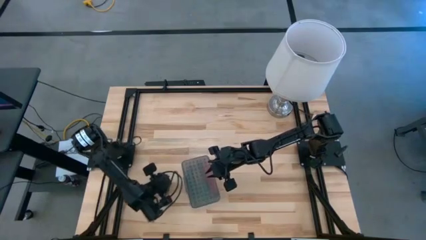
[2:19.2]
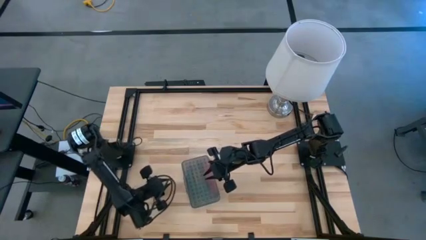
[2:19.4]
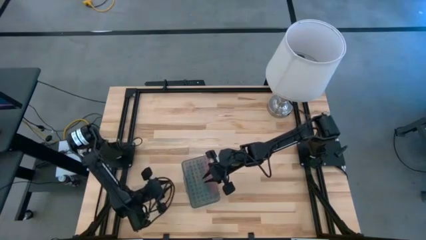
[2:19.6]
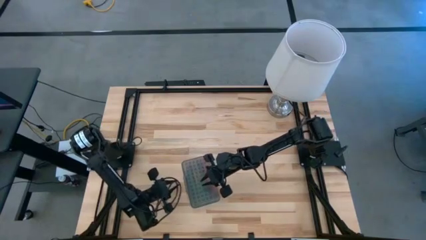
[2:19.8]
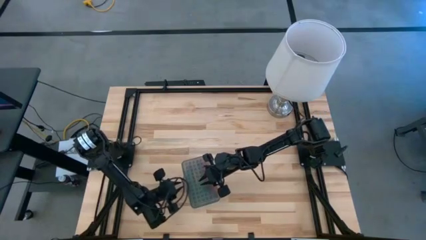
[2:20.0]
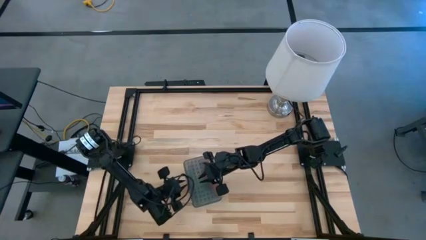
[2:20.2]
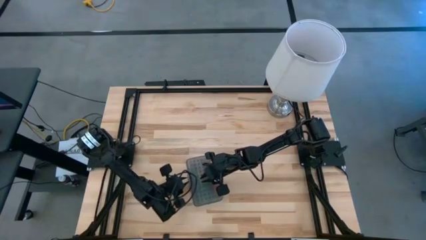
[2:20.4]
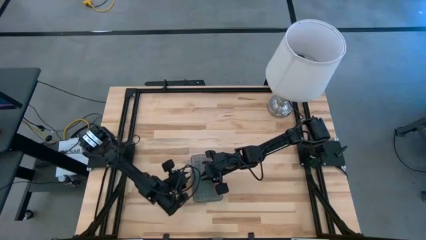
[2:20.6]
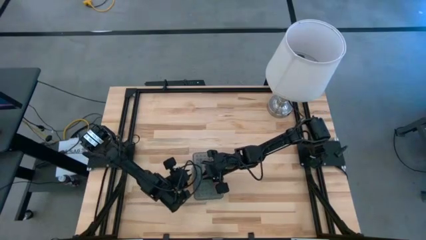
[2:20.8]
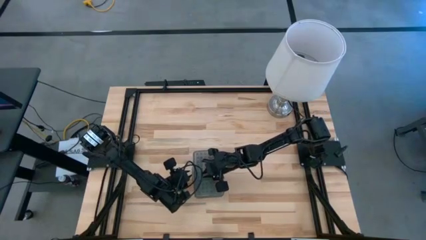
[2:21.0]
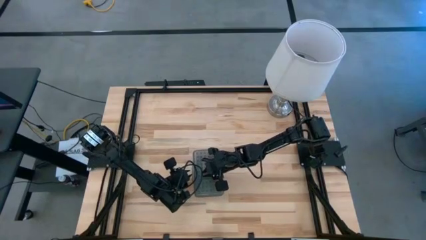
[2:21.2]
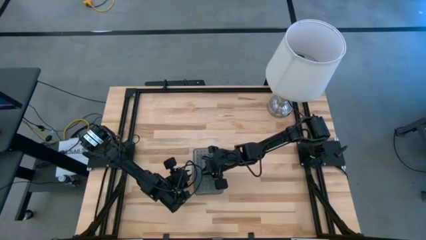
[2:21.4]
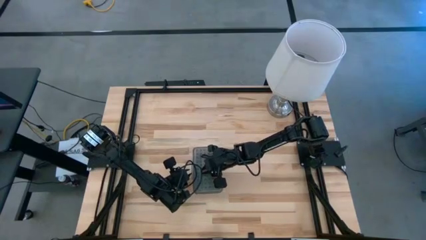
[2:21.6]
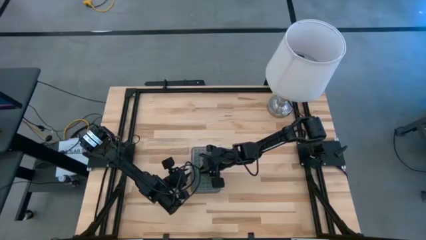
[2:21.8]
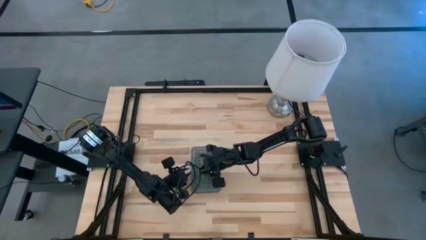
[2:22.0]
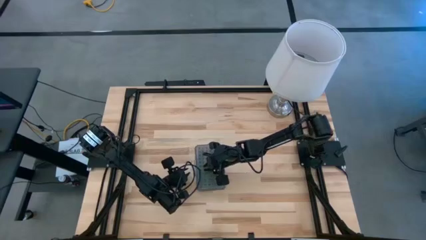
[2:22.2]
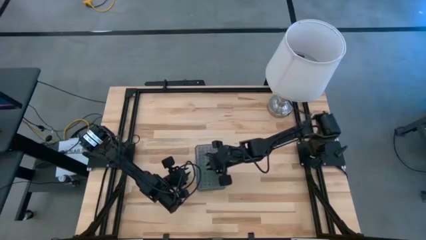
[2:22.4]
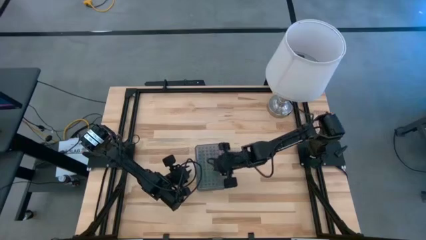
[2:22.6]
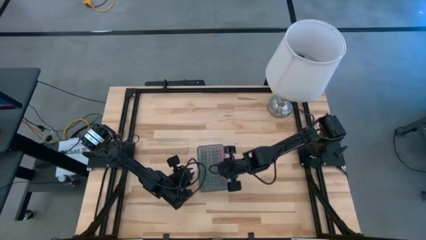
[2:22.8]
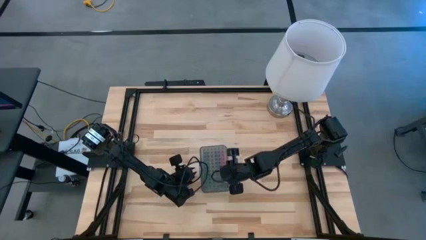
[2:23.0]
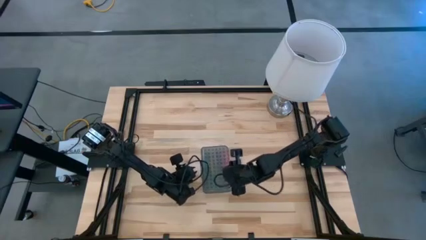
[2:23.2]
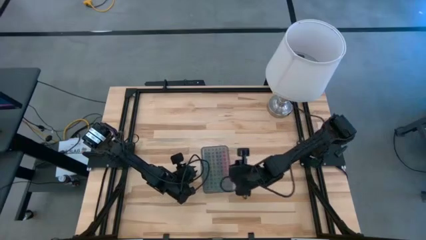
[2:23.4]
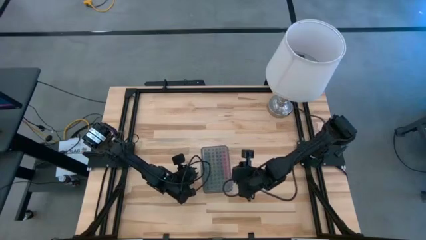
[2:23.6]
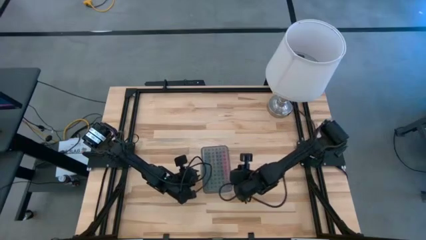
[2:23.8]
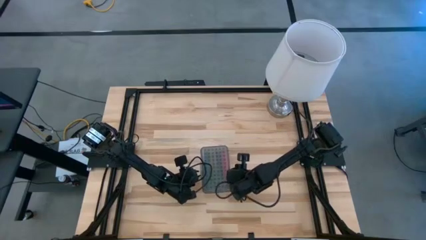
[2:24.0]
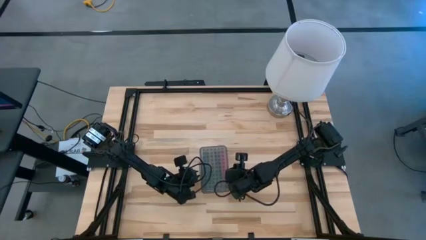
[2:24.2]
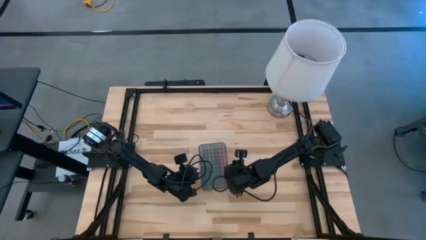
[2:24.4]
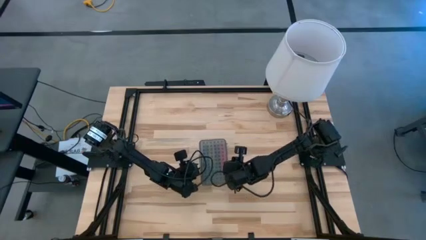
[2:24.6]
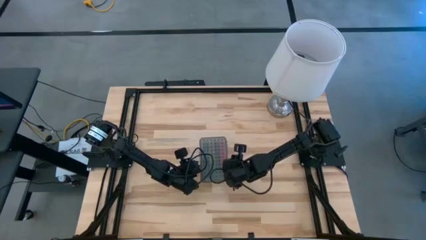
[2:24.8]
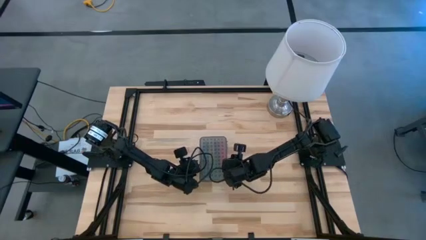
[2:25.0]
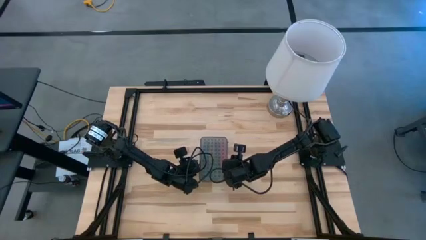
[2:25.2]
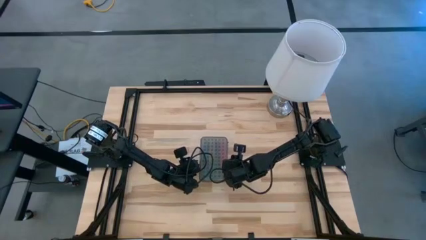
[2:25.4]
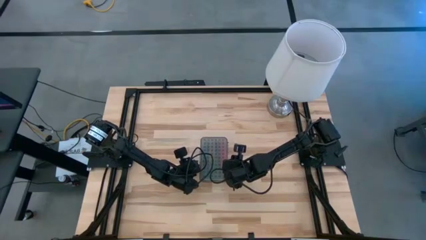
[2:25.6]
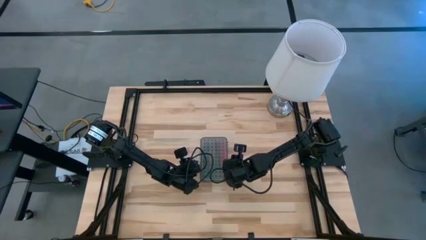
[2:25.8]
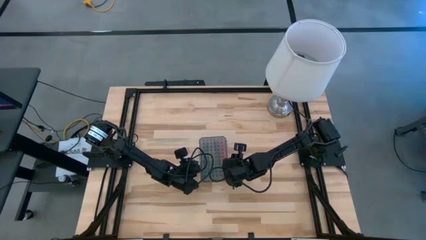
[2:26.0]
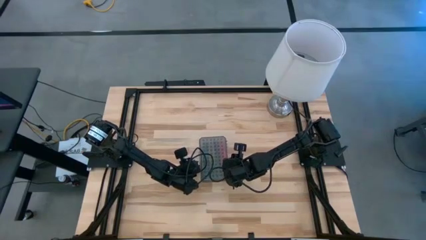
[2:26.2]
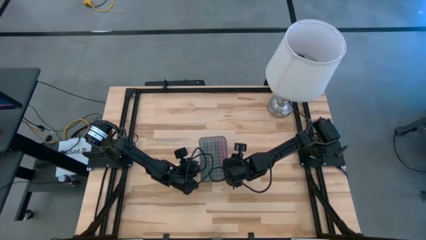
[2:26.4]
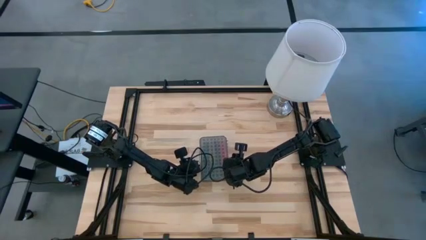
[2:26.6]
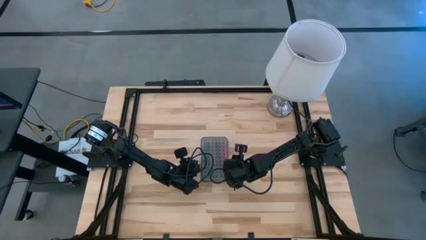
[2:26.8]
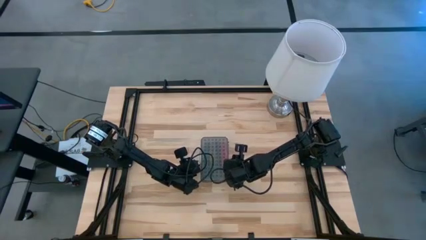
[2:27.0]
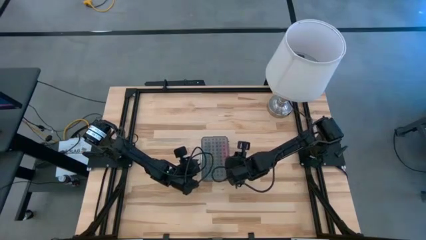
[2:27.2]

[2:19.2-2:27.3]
Task: Pick & place school supplies into a supply box
Move the black supply box from the bottom of the table to the center of the table

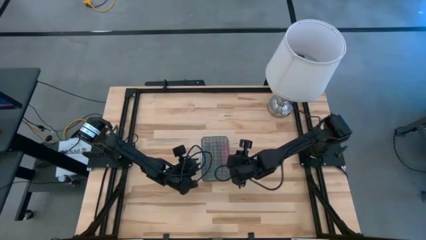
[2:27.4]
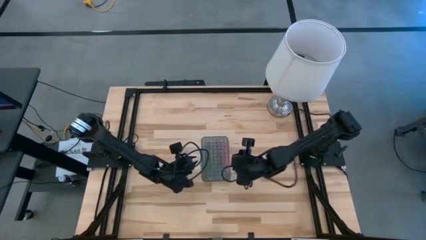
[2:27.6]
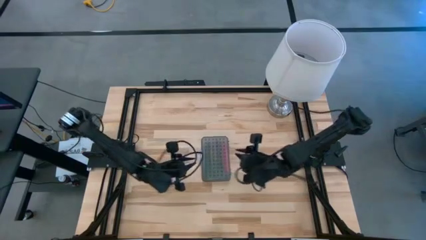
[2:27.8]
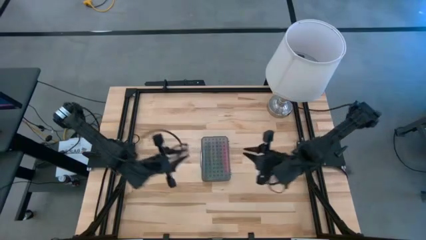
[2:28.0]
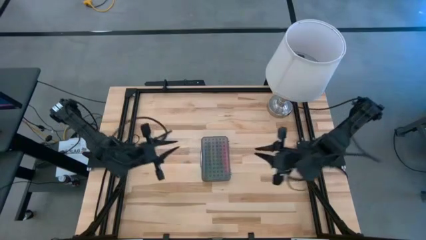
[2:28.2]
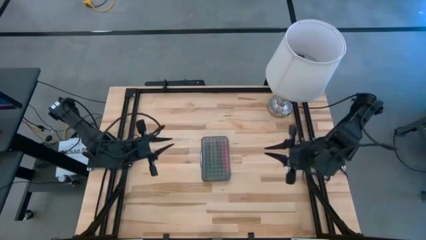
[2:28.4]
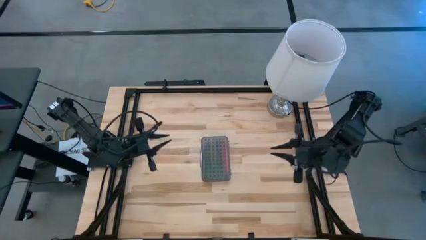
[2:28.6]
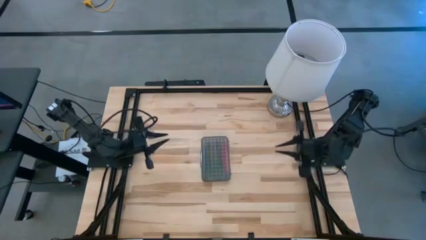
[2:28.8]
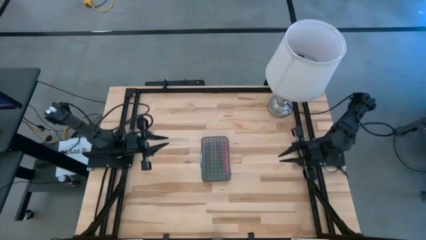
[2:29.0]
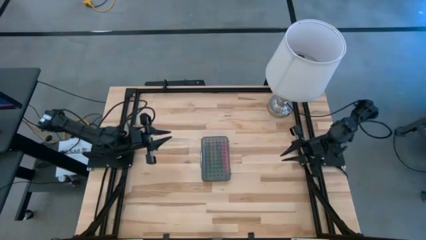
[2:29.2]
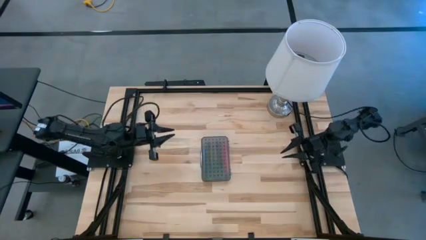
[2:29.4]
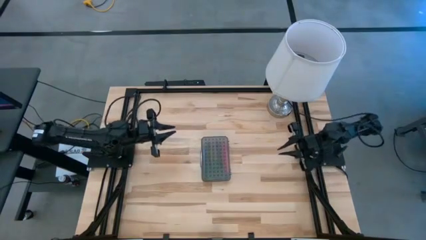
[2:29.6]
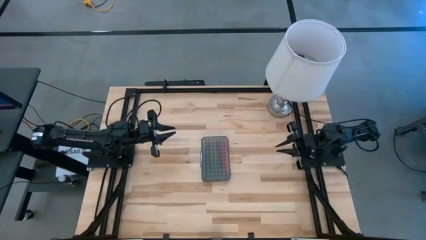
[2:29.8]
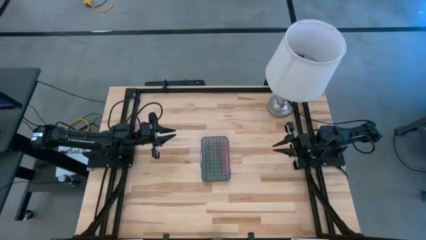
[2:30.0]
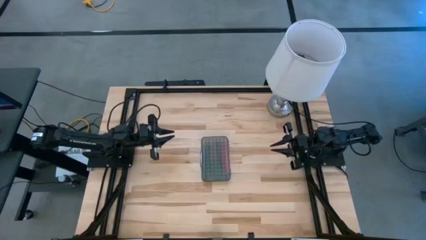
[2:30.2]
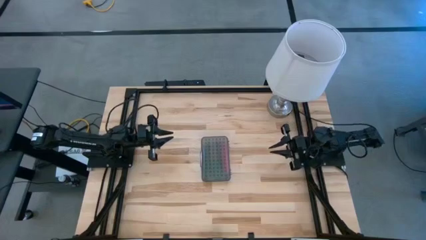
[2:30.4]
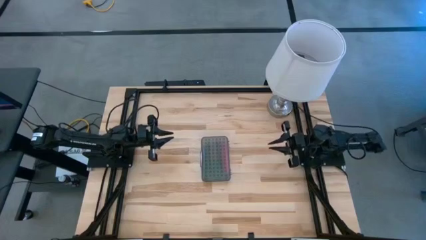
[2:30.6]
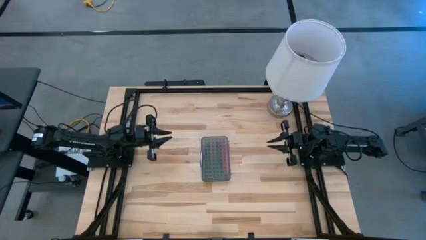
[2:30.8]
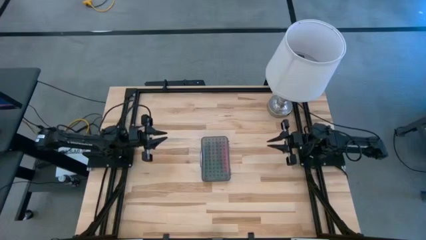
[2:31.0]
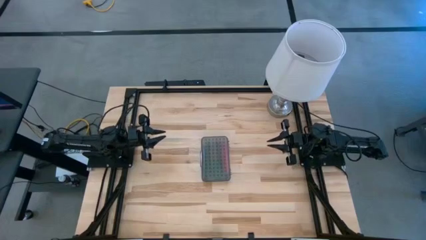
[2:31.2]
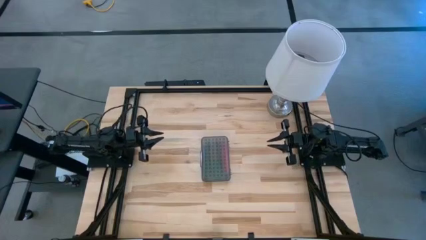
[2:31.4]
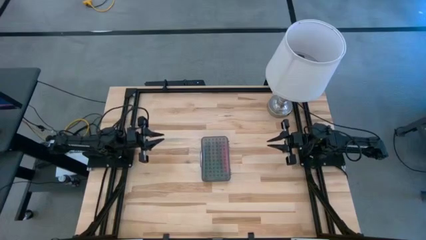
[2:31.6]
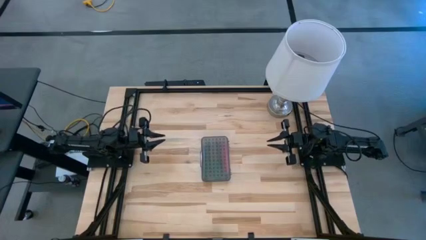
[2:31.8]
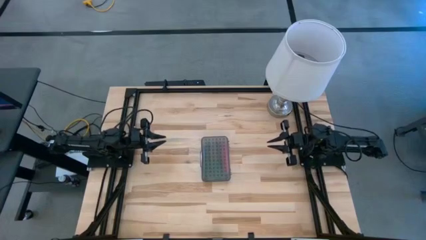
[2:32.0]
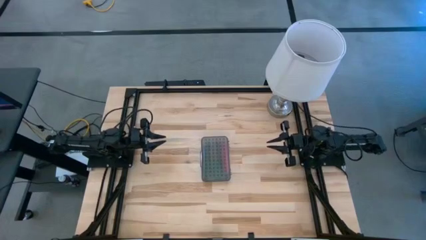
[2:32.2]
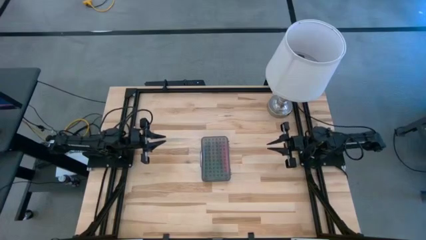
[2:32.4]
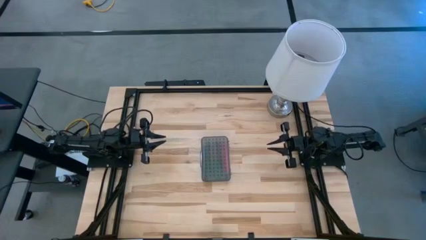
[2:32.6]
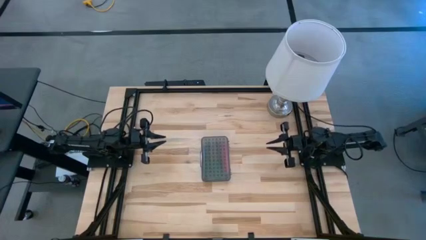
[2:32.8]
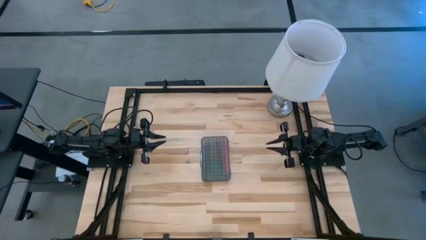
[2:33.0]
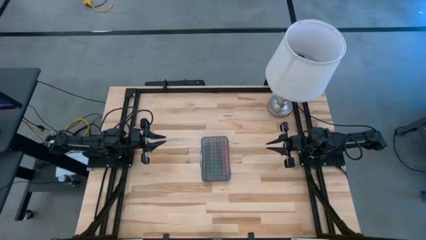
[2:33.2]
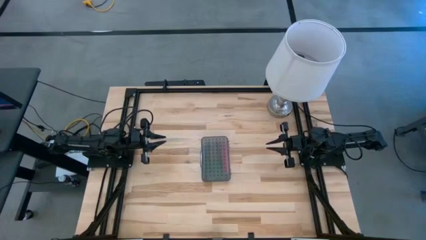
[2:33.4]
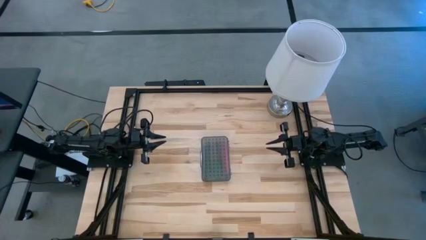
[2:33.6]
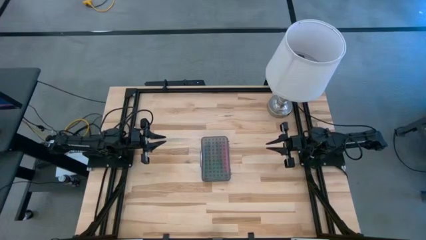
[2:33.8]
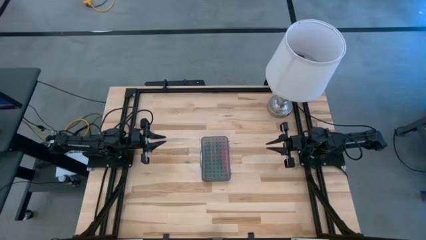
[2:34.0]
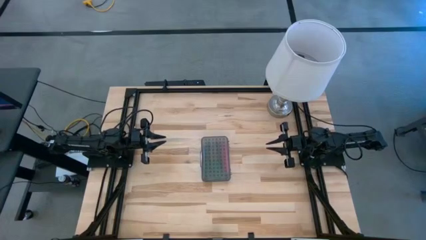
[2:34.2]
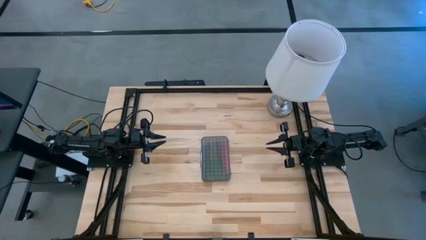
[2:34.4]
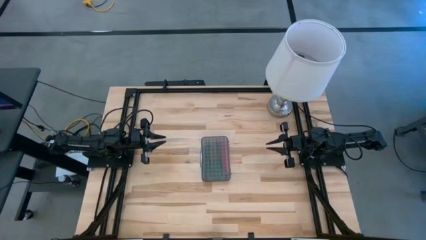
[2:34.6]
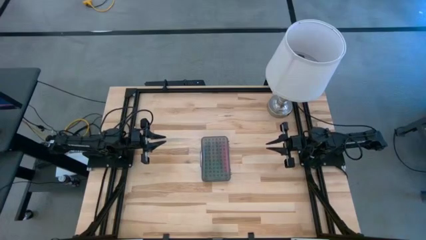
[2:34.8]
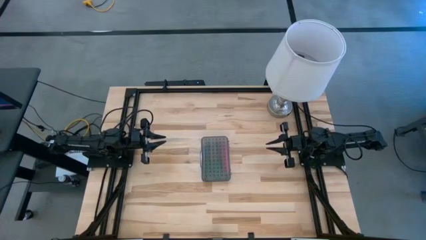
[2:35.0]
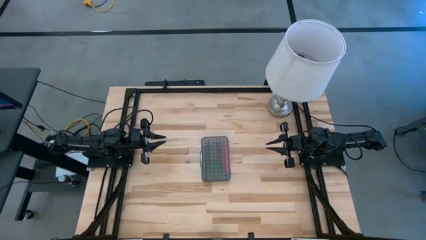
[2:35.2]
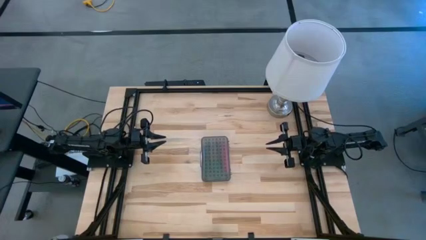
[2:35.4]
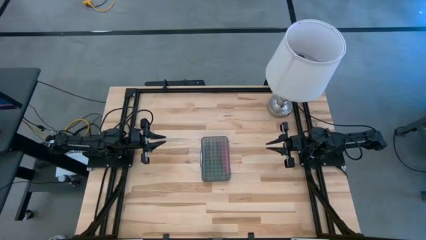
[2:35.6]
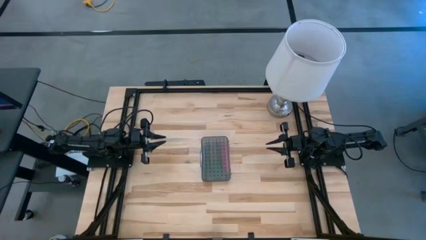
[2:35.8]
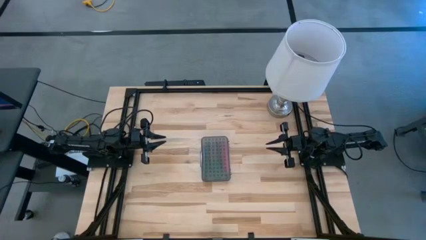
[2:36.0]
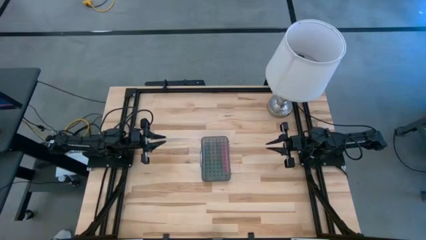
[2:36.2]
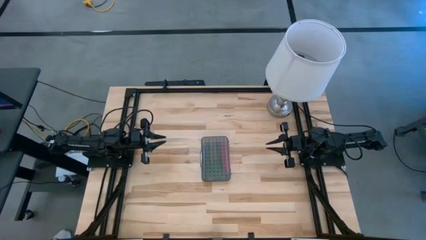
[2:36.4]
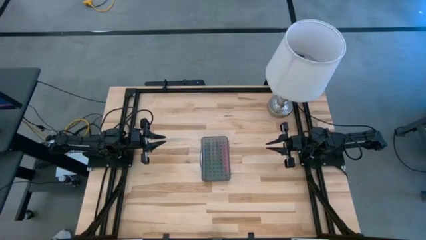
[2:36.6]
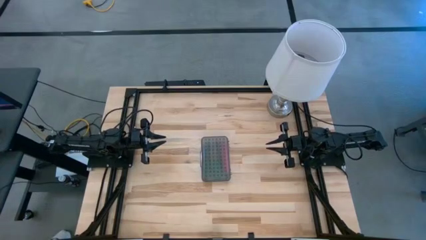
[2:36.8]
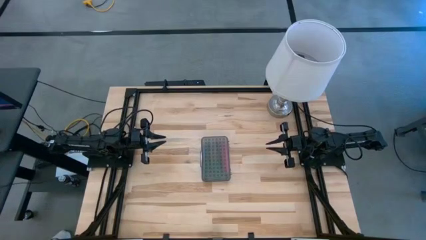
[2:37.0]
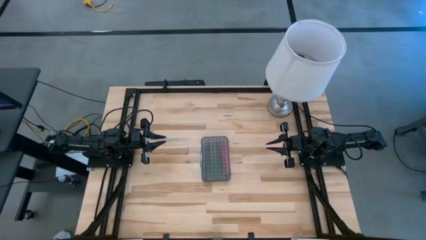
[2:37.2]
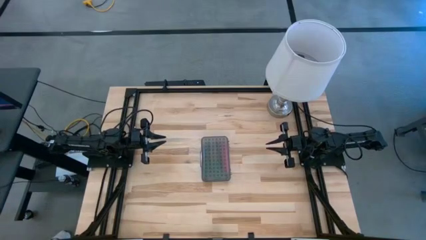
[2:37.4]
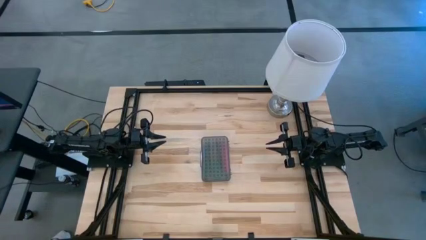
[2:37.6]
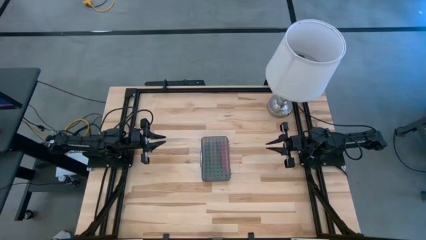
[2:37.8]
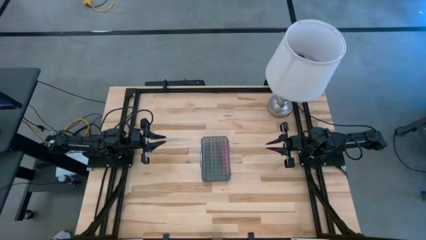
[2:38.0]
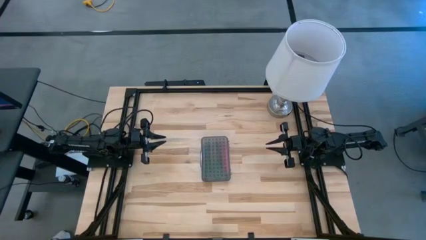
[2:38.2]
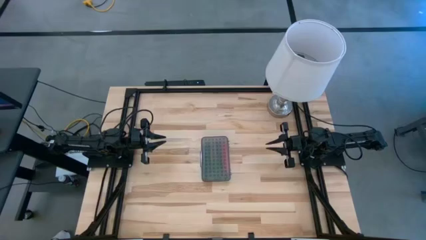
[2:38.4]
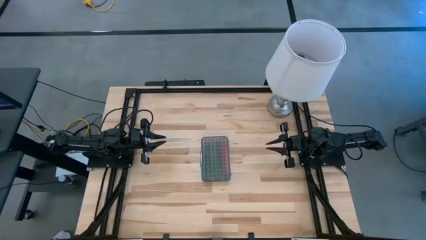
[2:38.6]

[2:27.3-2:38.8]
Return to Home Position
